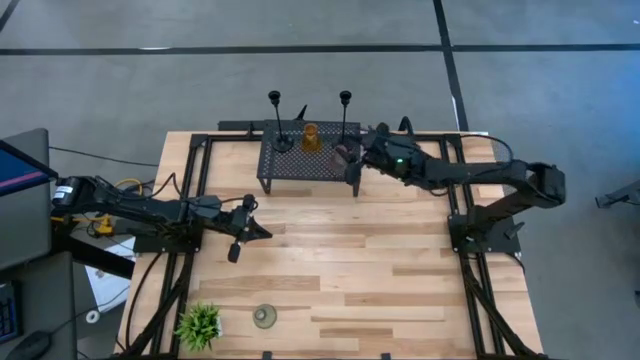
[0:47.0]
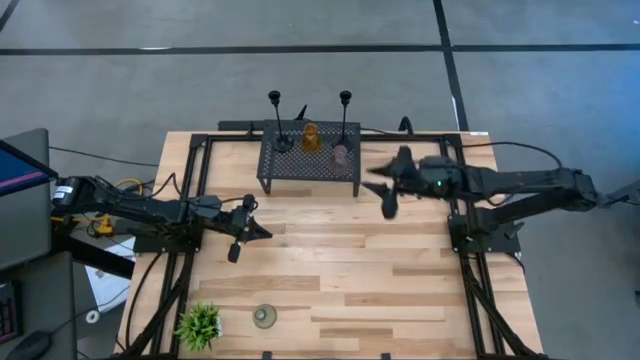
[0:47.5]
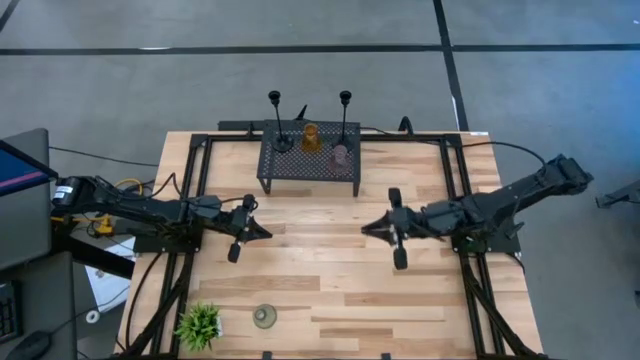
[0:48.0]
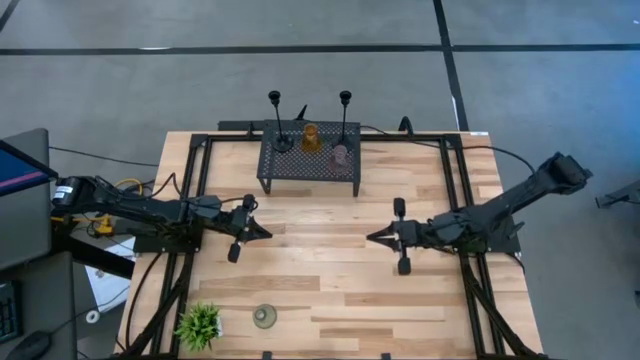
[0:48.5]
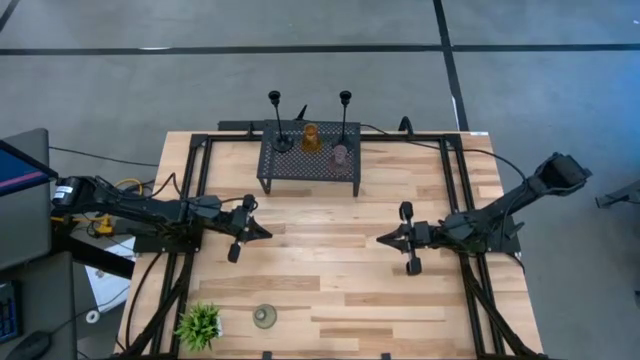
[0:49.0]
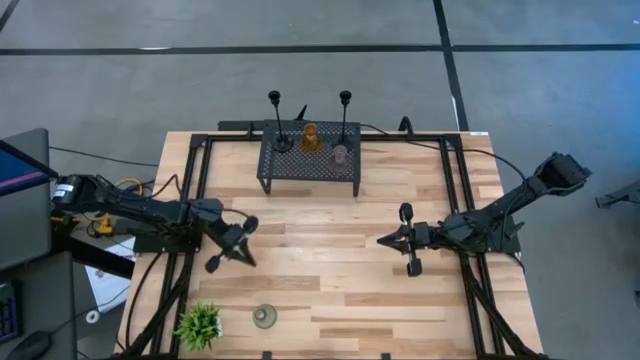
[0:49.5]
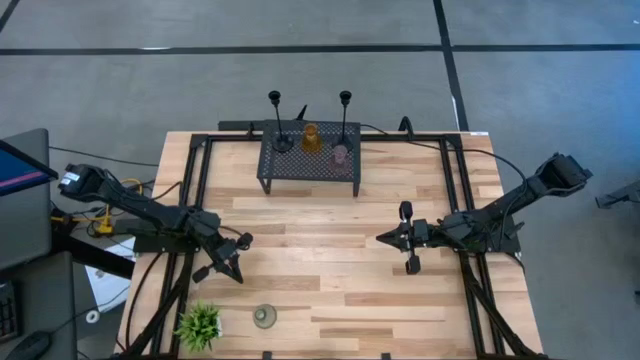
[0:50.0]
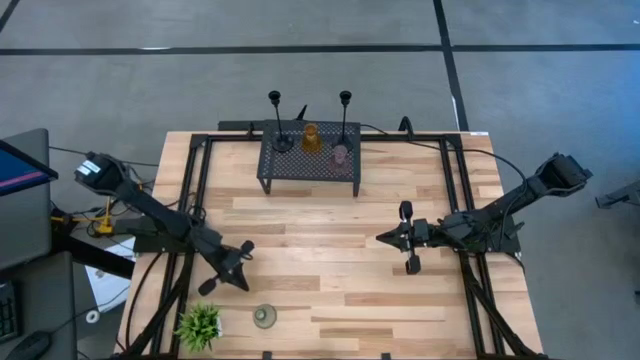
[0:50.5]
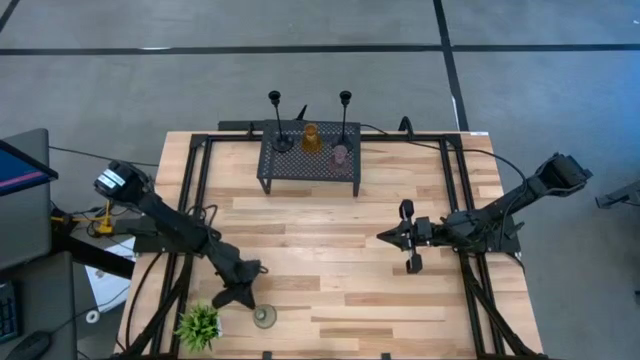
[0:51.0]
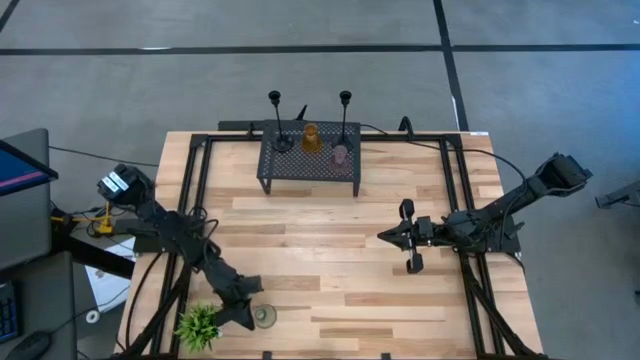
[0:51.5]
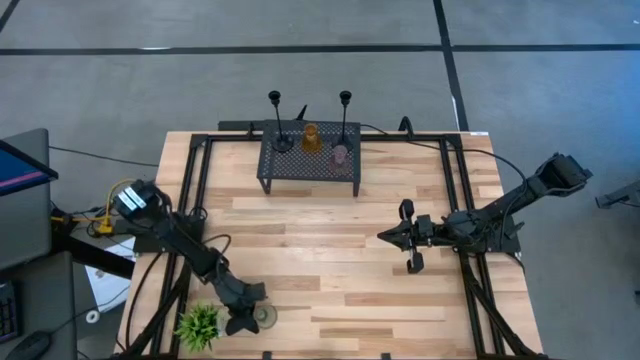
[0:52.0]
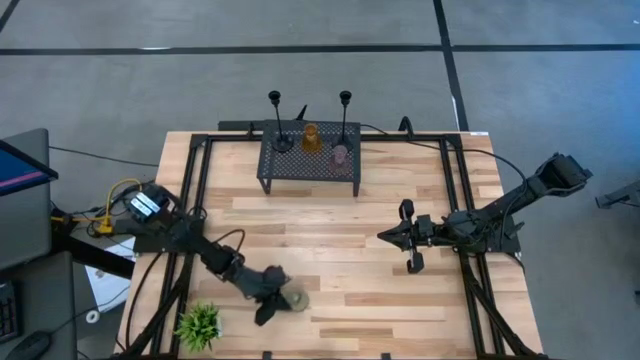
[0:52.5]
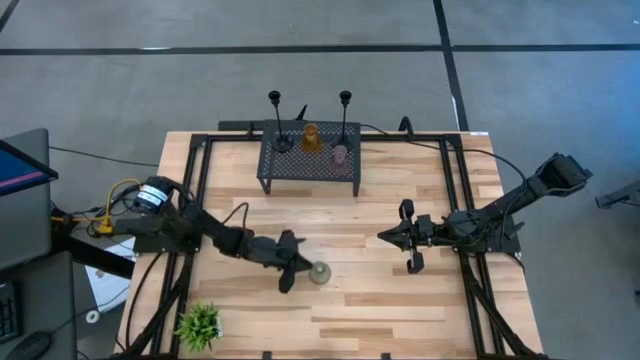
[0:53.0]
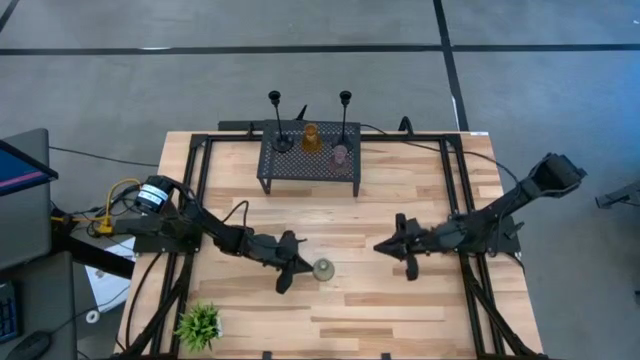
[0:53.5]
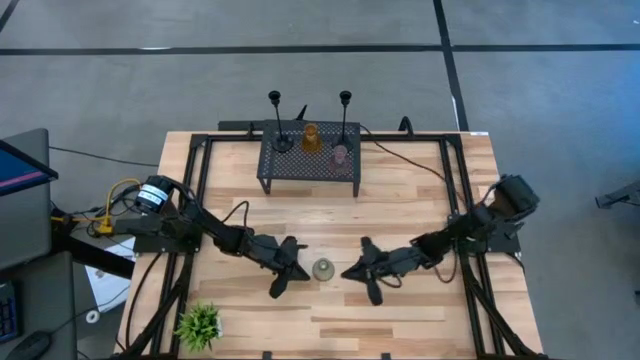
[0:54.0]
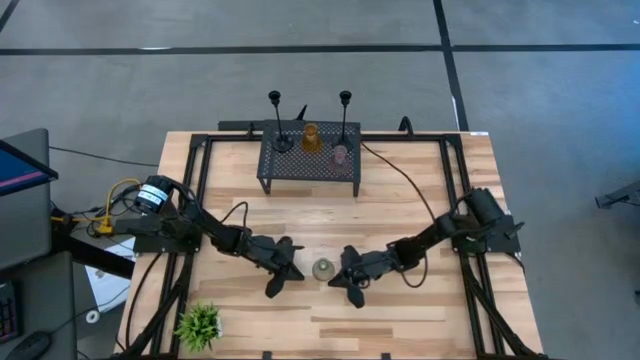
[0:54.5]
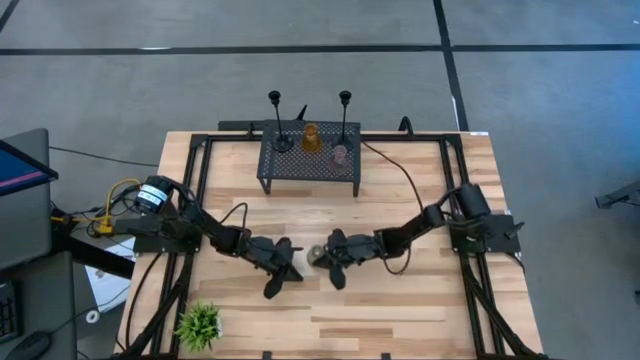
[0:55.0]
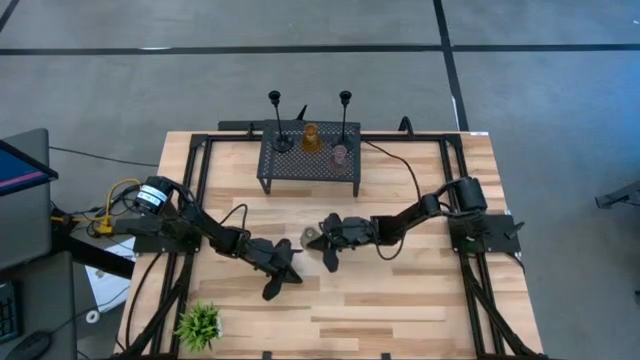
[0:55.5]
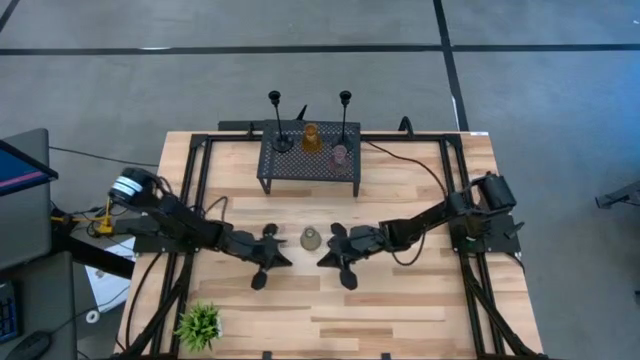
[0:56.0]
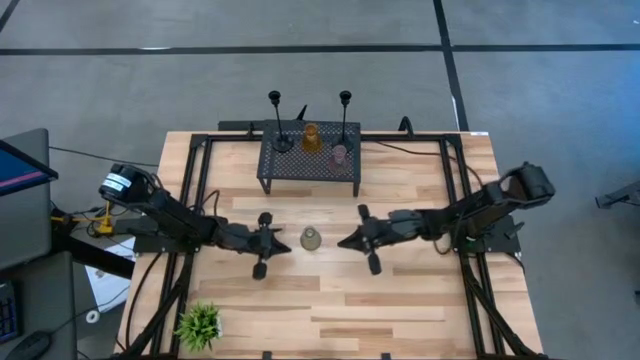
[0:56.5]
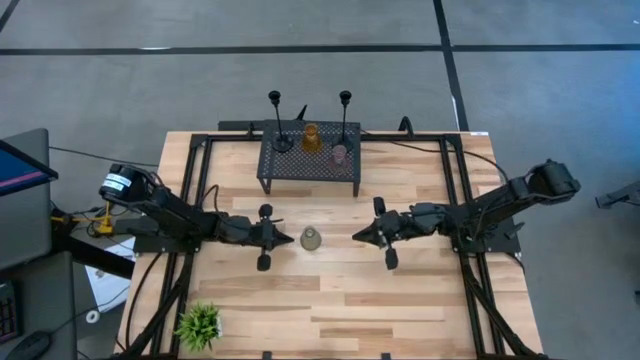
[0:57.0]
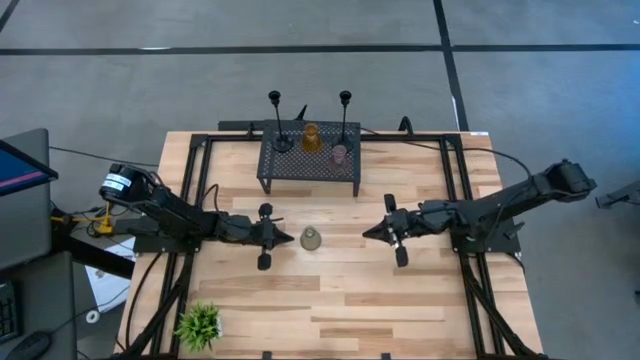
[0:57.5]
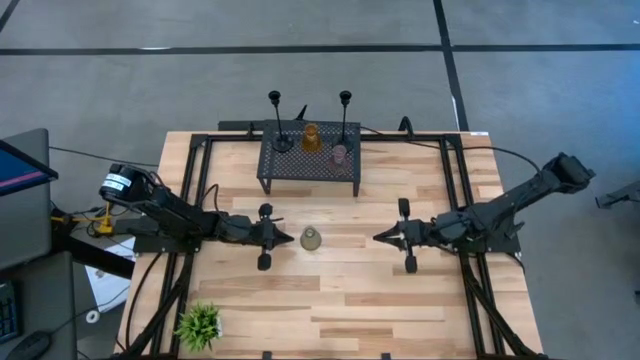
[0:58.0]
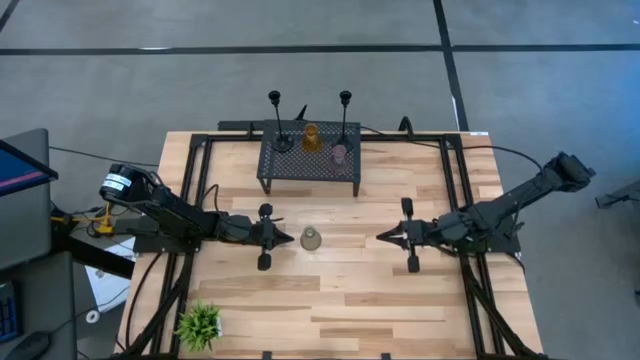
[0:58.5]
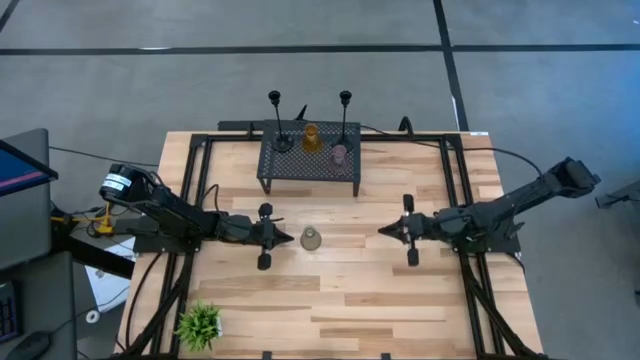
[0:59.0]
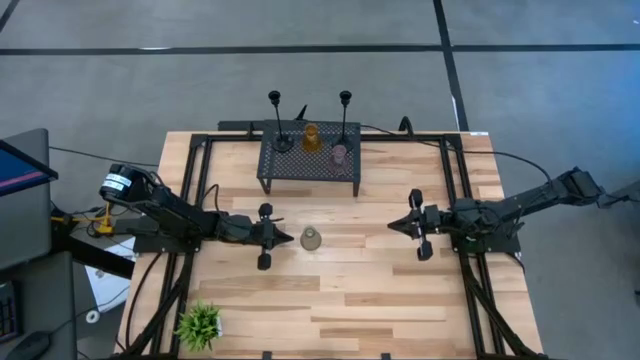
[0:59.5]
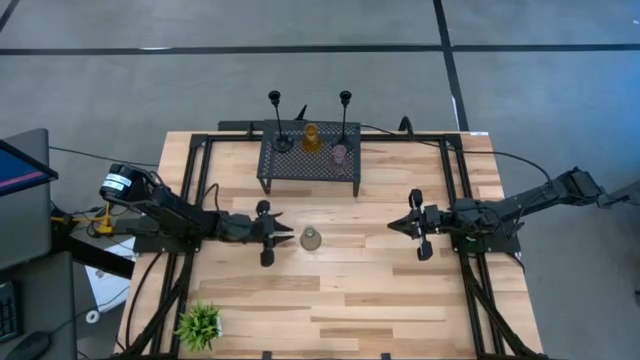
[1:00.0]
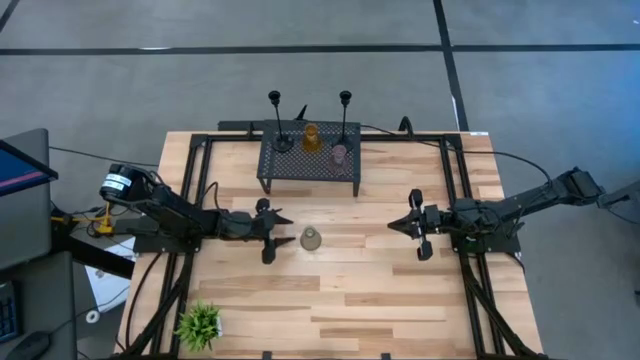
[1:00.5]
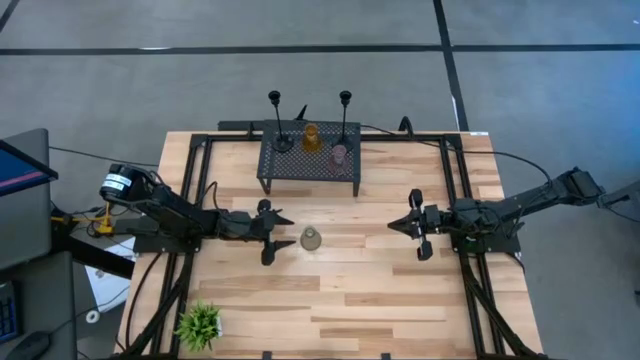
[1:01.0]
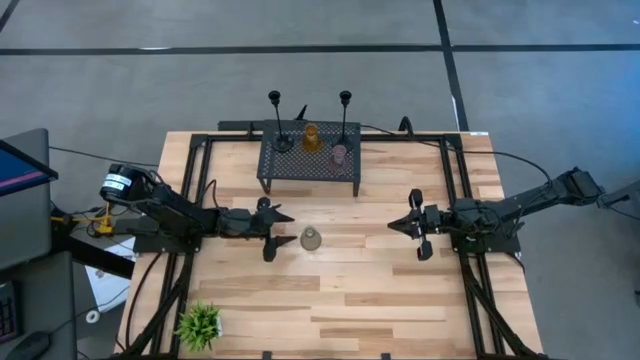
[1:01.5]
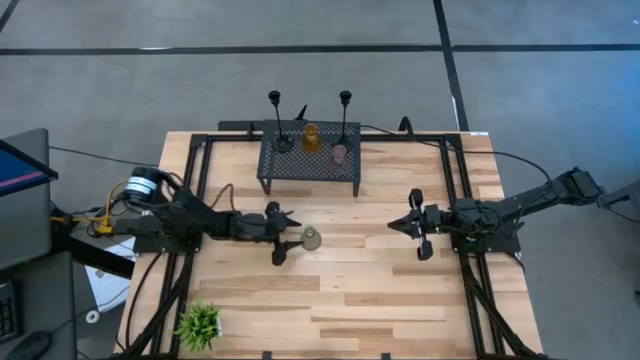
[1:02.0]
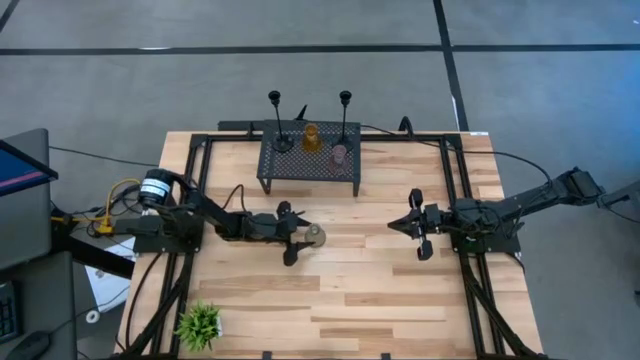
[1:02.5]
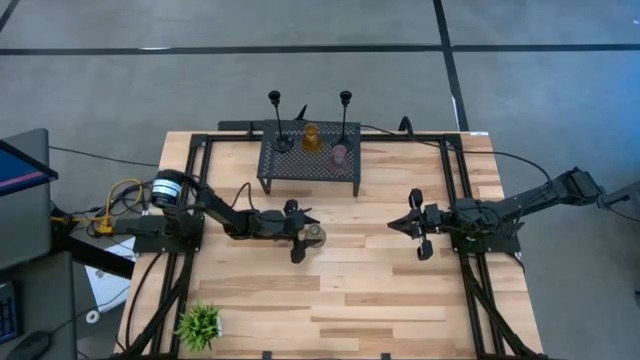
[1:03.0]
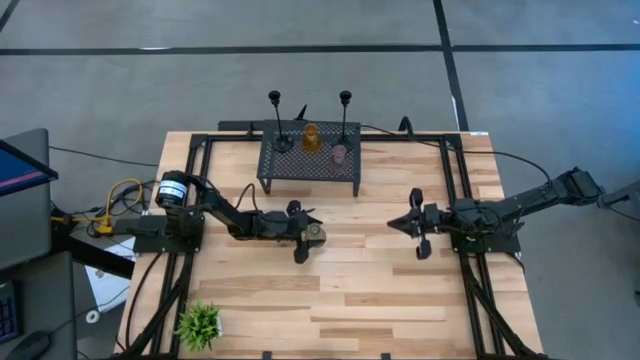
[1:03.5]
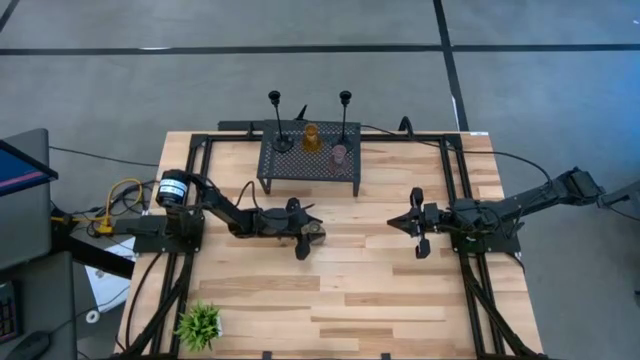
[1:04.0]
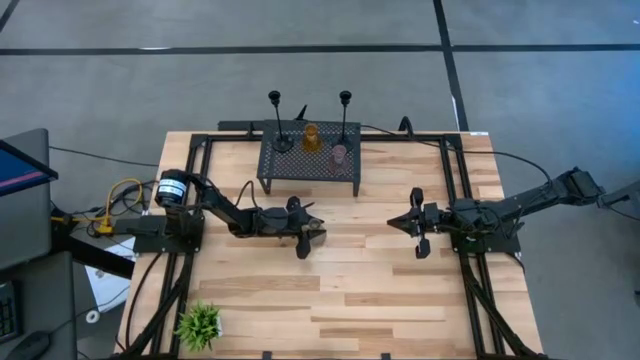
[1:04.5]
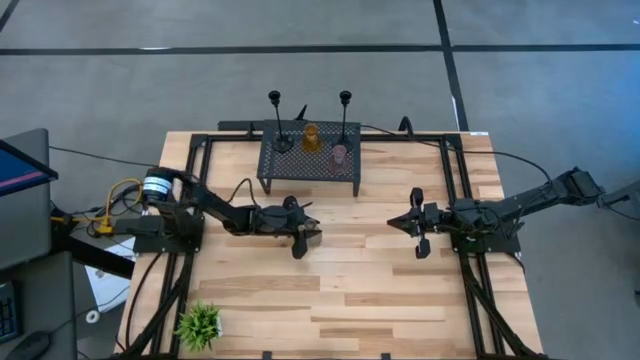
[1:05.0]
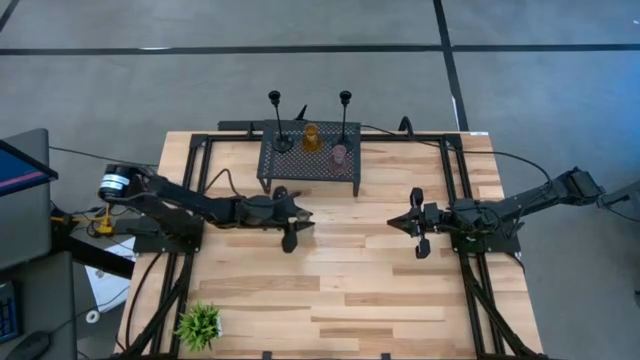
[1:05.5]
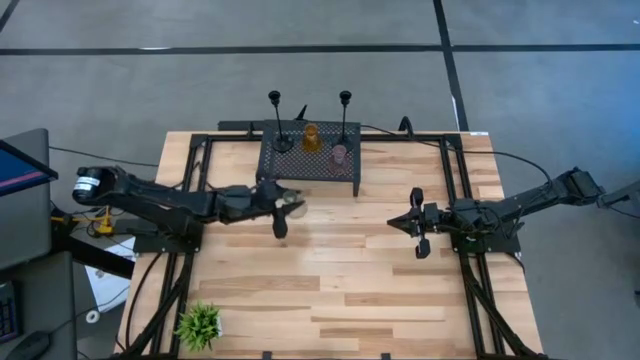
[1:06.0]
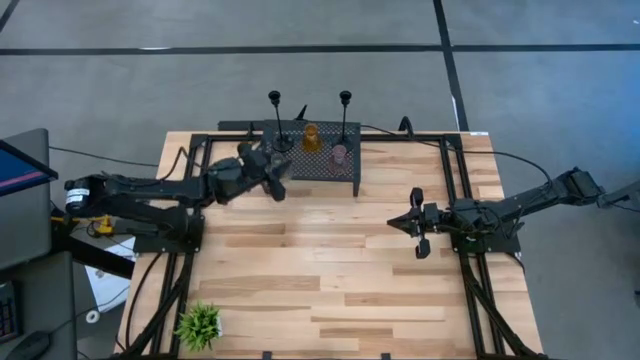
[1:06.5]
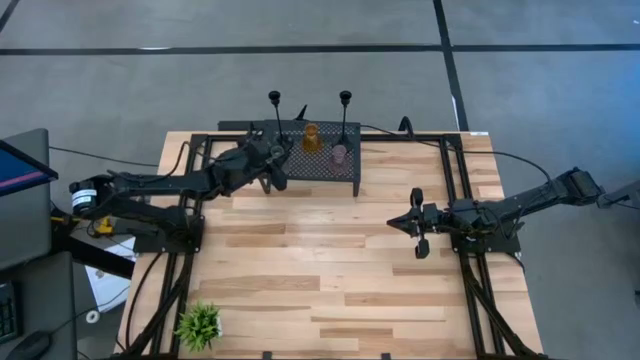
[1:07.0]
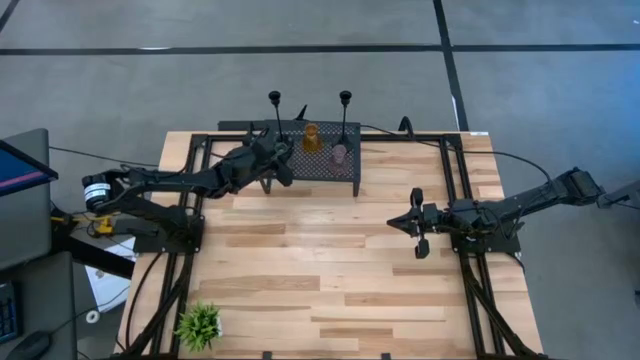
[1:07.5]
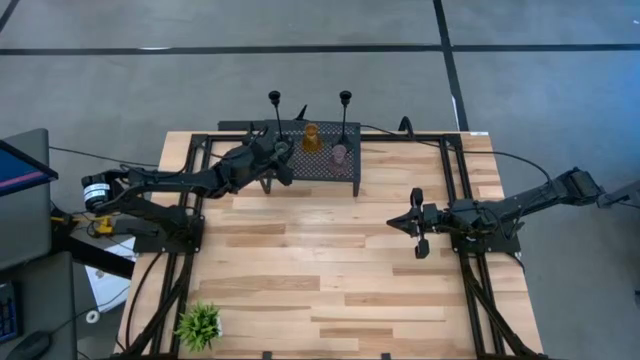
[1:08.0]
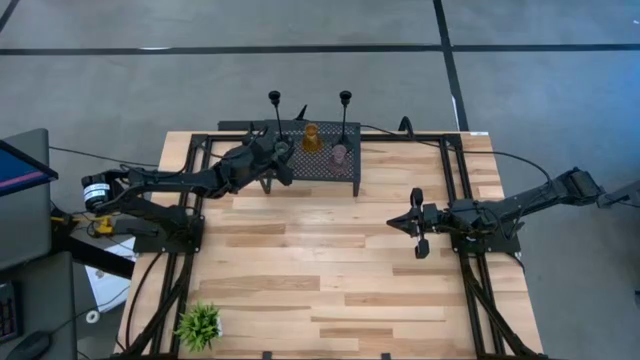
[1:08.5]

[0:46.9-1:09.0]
Task: Pick & Place candle stick holders
Put the green glass candle holder on the shelf
